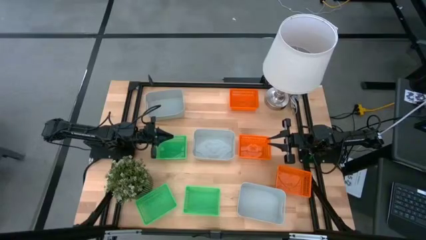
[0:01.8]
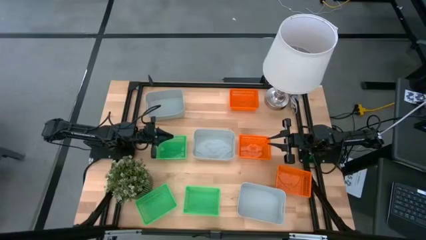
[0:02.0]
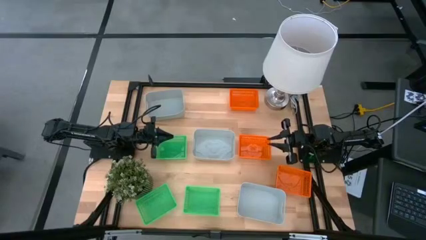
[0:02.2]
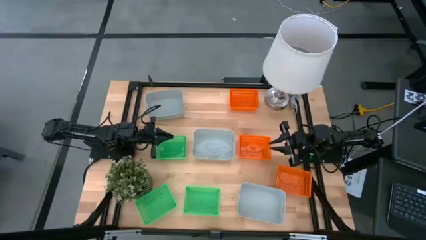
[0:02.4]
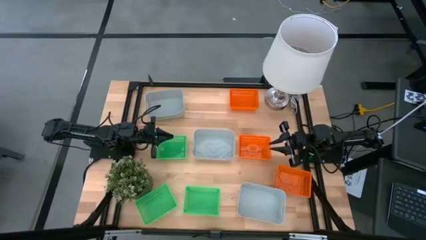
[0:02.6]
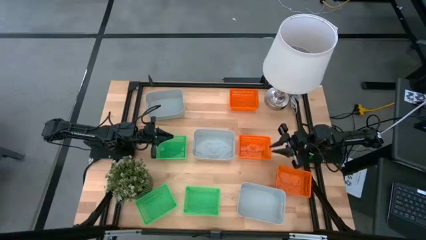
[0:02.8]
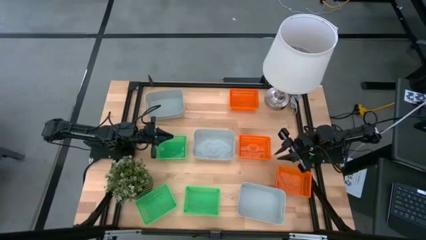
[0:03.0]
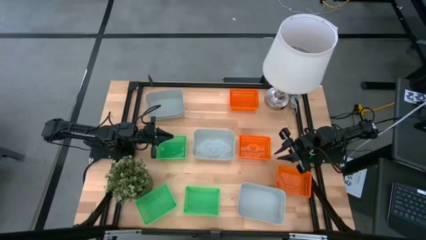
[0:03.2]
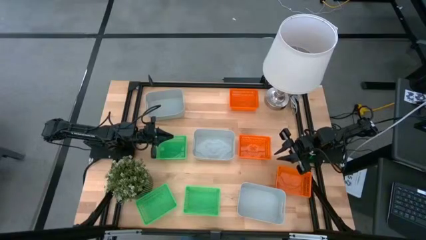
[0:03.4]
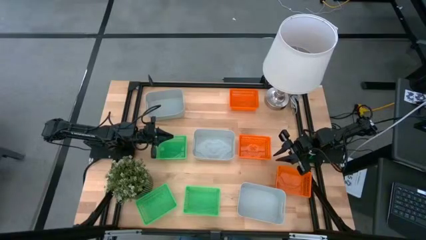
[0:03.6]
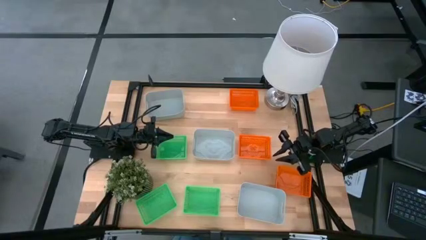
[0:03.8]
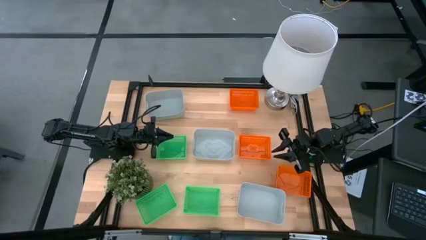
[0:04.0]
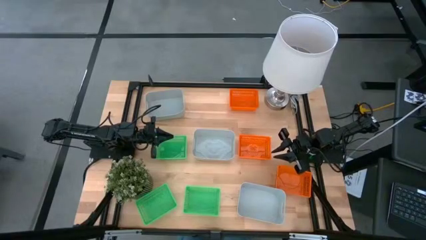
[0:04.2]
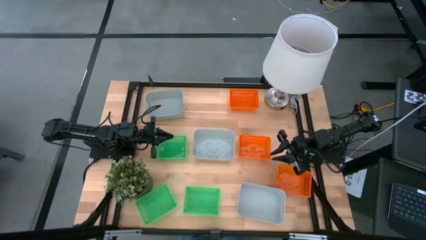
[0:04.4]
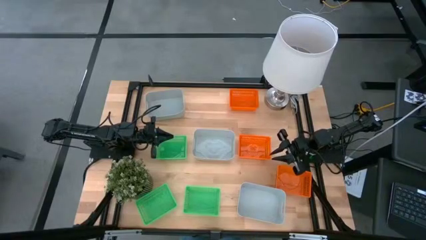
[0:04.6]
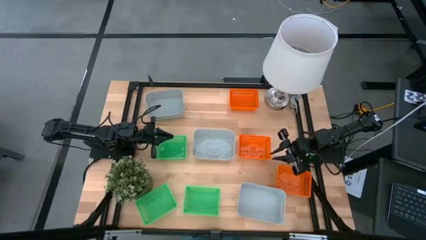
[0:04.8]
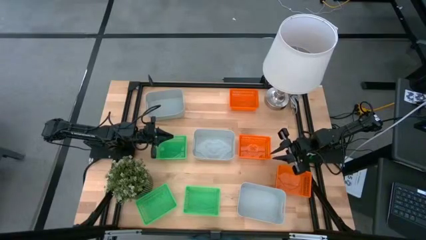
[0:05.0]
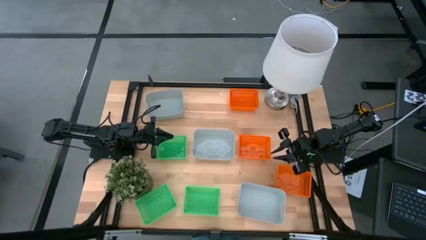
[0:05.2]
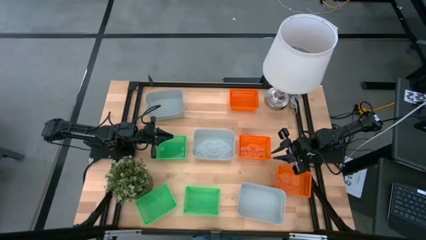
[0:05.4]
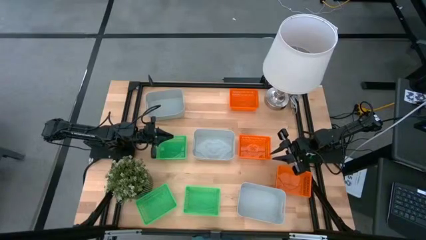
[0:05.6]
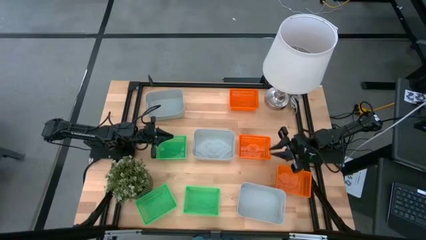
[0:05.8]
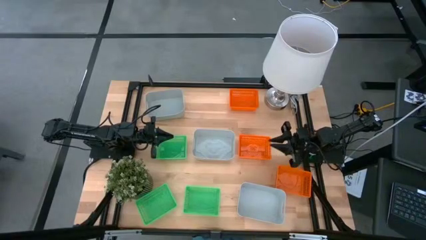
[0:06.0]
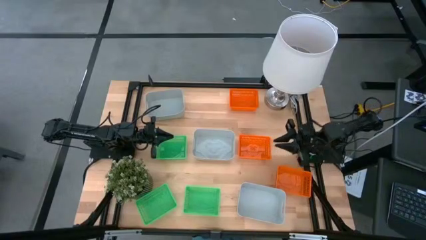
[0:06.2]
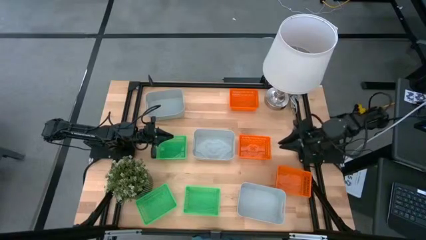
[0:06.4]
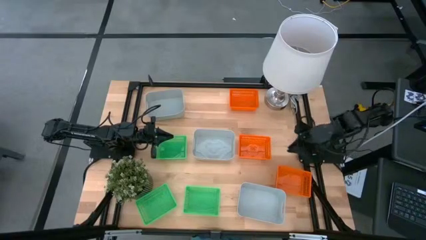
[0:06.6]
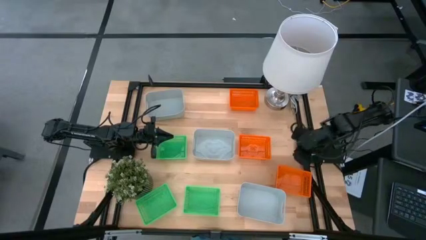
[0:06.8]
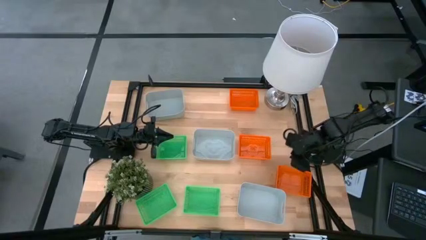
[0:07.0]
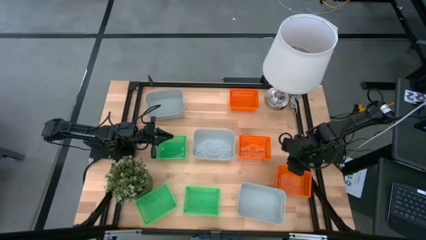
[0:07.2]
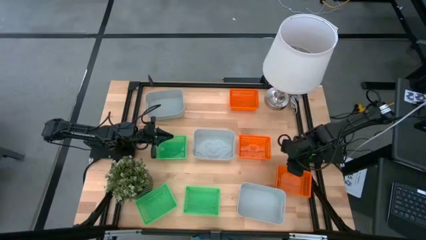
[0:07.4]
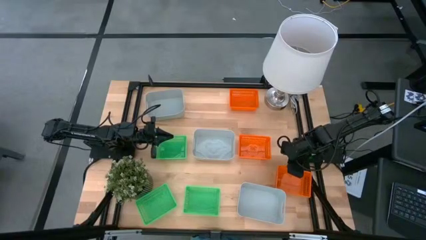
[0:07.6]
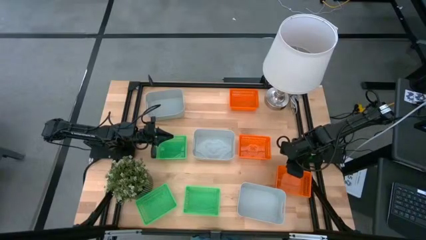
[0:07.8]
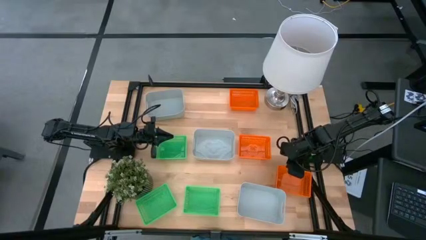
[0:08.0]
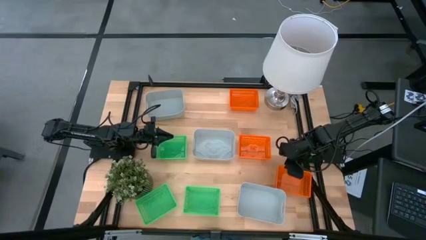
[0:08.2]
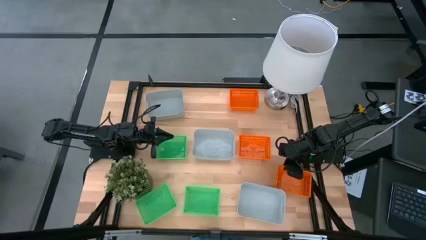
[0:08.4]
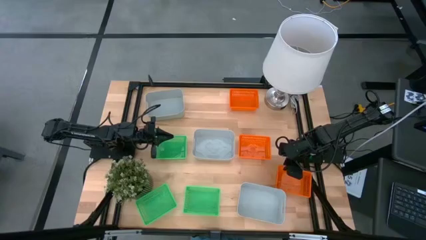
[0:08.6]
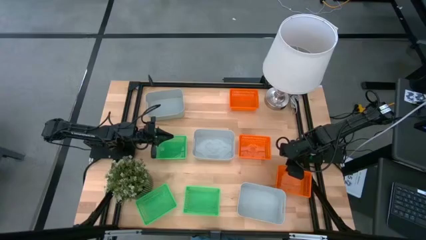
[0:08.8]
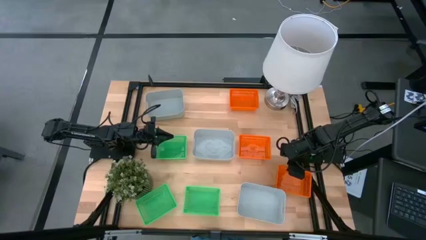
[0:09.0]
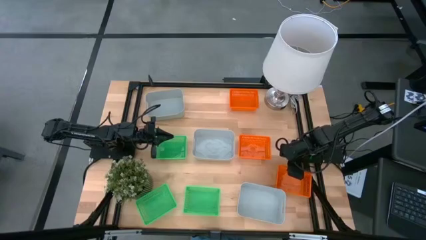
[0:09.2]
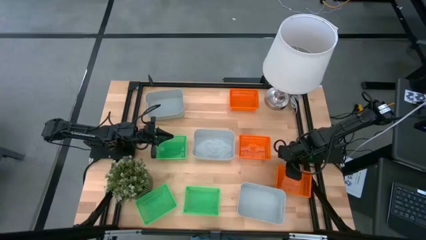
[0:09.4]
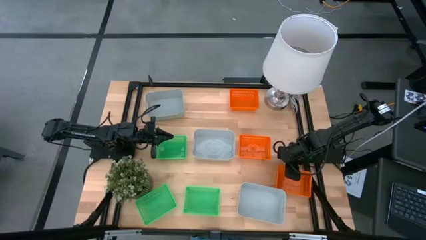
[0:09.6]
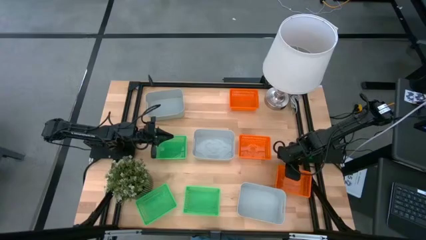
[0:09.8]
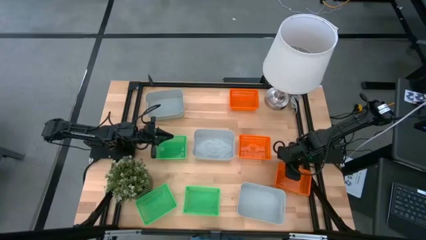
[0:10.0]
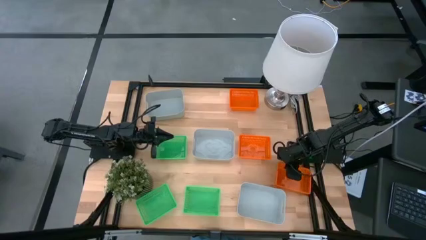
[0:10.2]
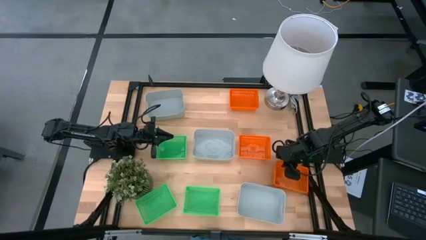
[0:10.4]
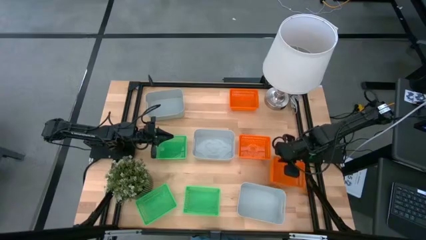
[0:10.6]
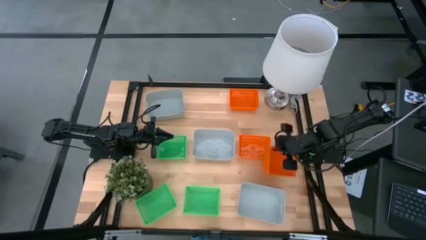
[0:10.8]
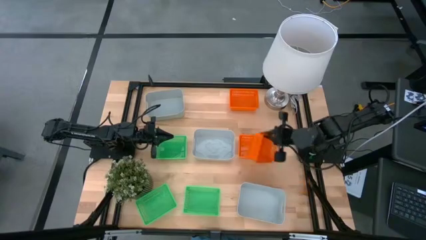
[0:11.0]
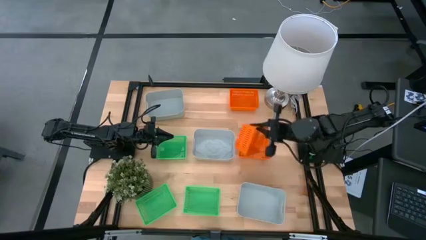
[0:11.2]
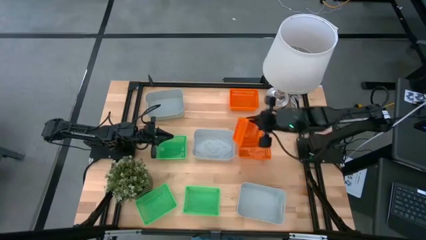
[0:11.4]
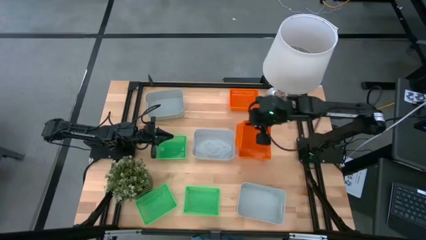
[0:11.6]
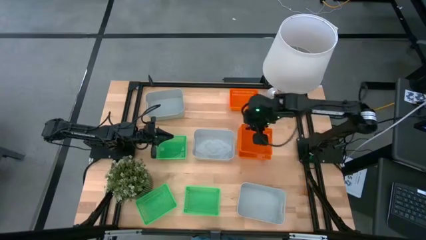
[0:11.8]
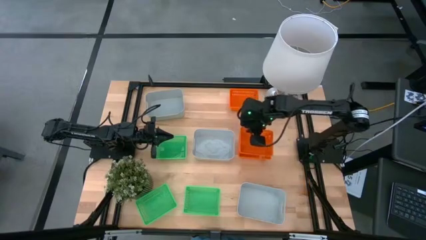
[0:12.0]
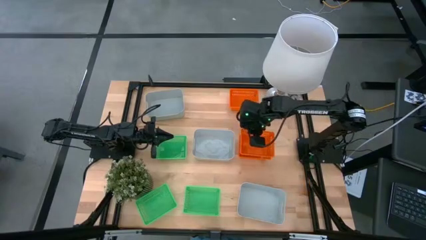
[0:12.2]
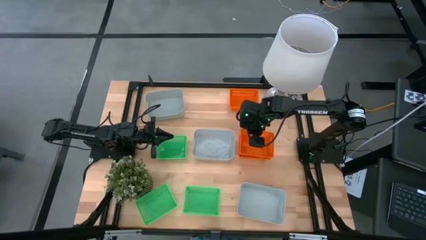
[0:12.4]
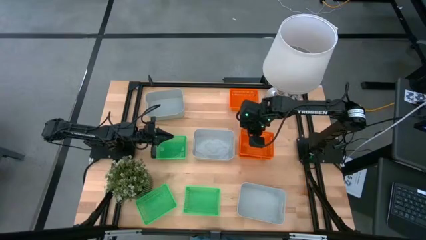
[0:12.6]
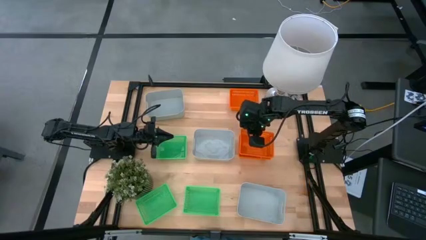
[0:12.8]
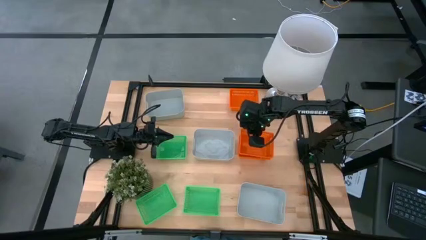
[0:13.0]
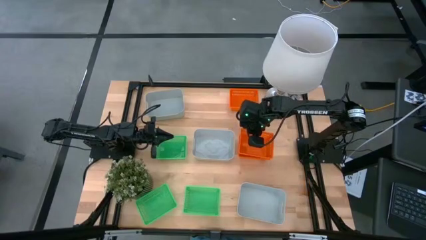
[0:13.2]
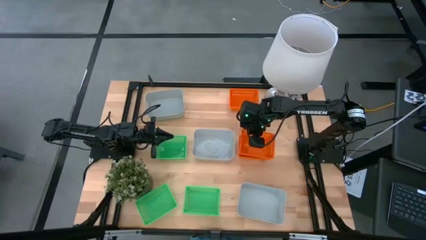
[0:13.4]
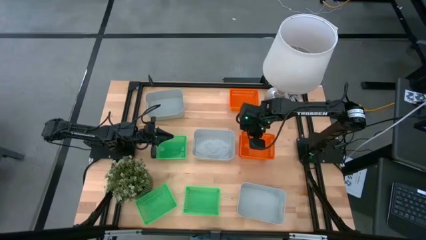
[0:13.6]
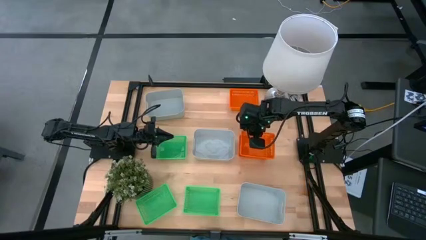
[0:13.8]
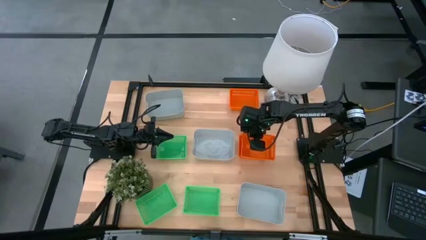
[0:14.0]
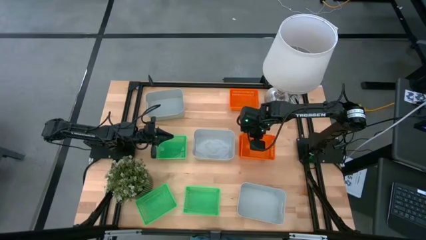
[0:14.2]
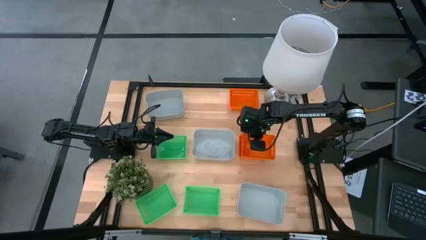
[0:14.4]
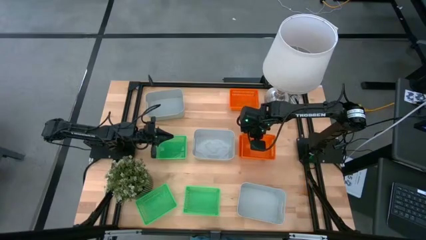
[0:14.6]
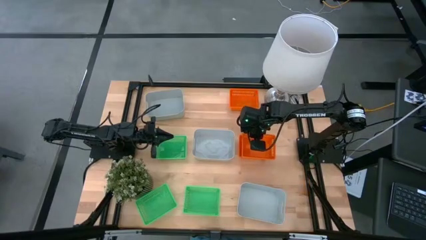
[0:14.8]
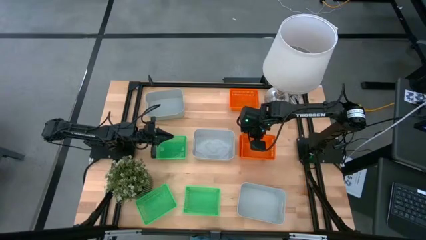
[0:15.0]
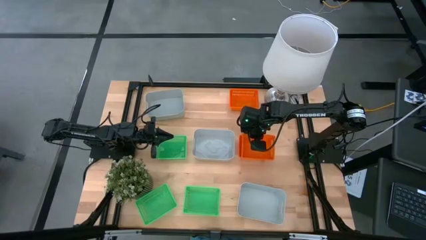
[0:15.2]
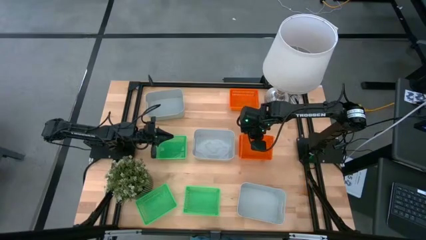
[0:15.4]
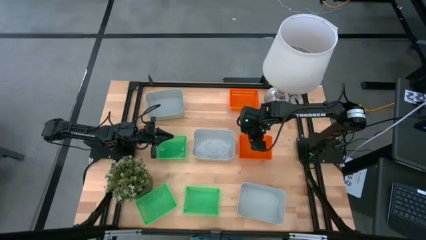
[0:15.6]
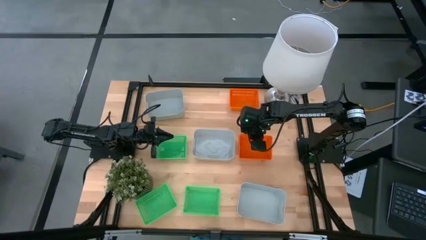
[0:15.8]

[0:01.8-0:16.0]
Stack the bottom orange bin on top of the middle orange bin
